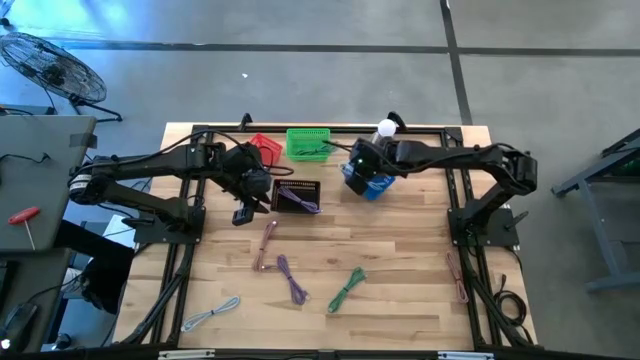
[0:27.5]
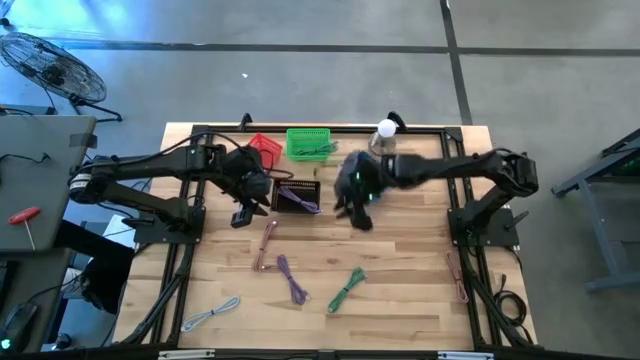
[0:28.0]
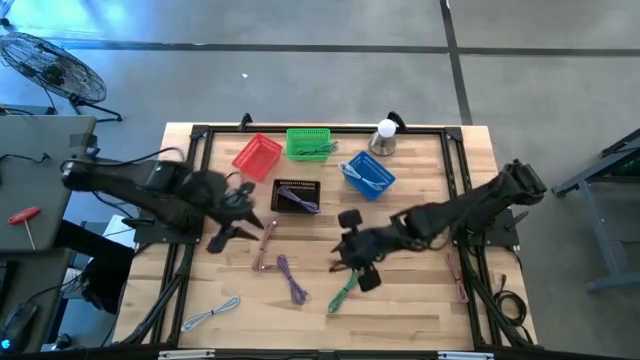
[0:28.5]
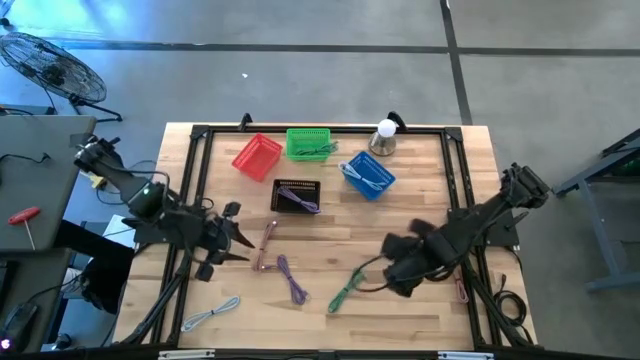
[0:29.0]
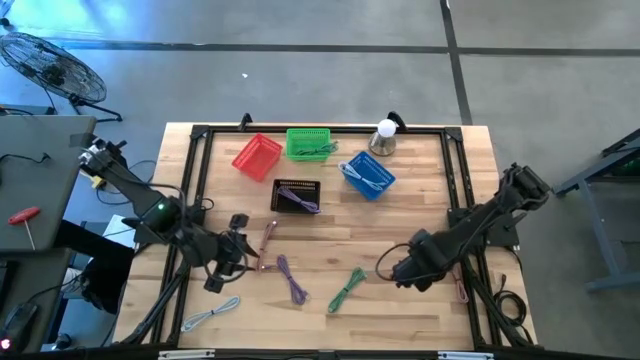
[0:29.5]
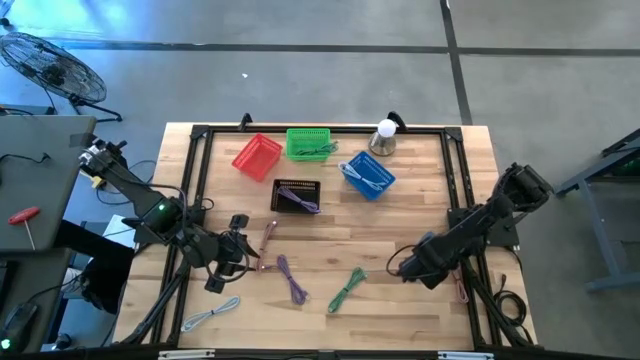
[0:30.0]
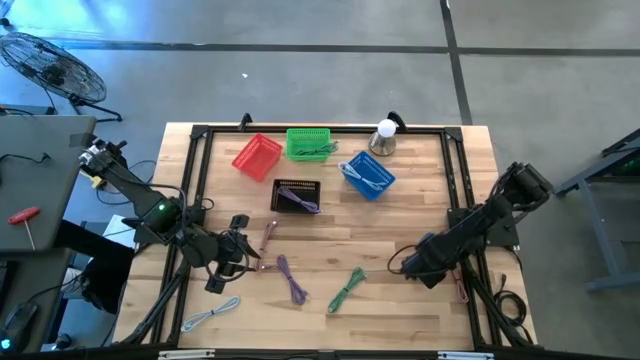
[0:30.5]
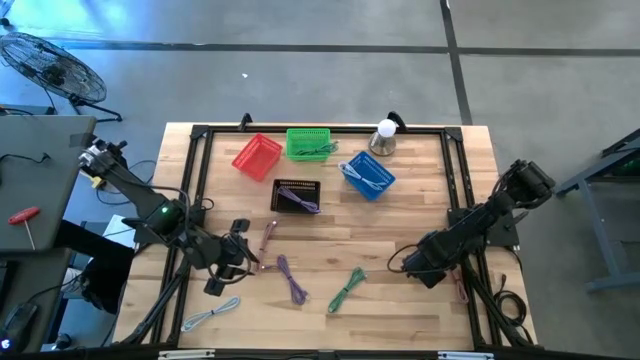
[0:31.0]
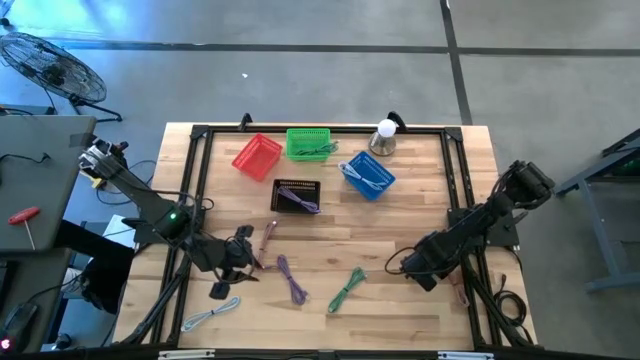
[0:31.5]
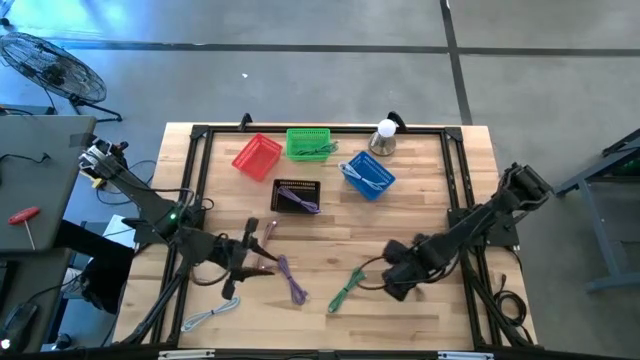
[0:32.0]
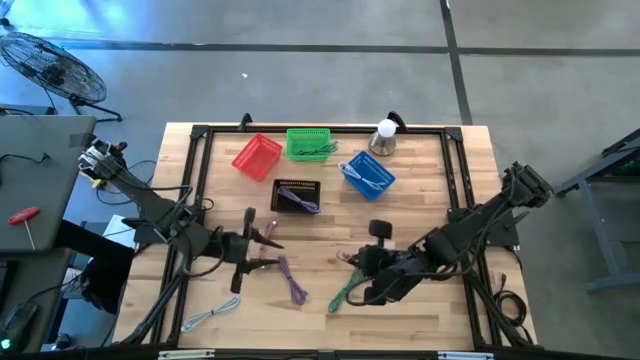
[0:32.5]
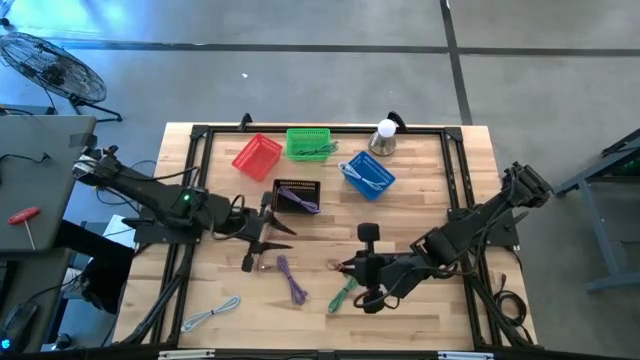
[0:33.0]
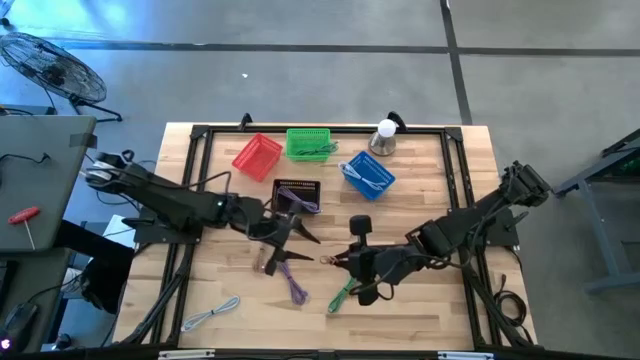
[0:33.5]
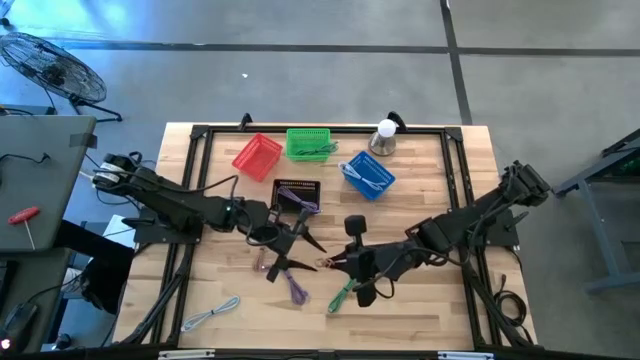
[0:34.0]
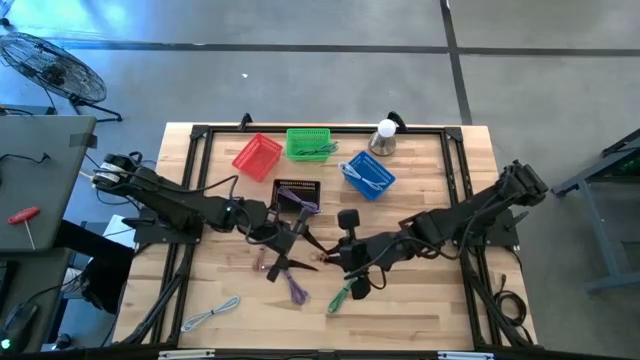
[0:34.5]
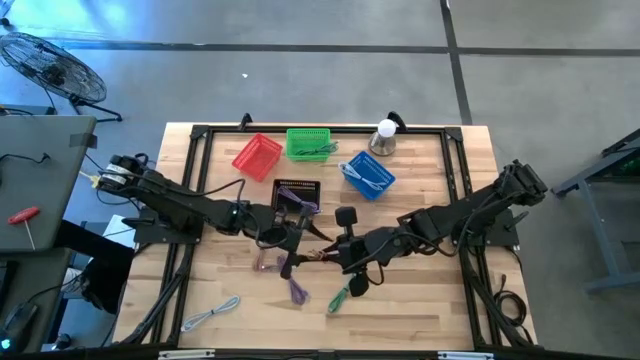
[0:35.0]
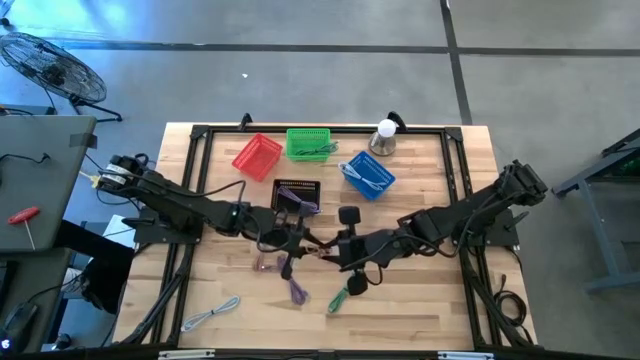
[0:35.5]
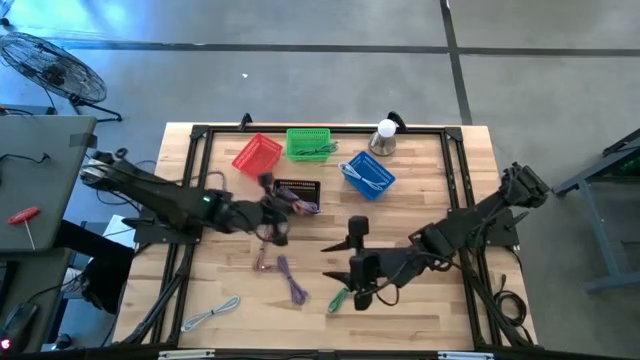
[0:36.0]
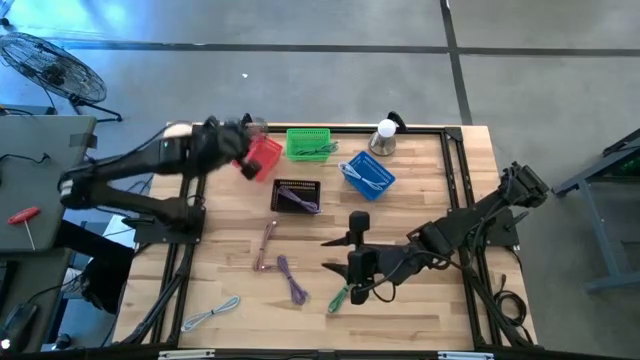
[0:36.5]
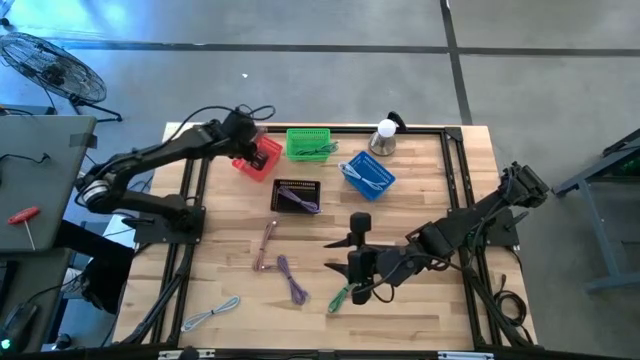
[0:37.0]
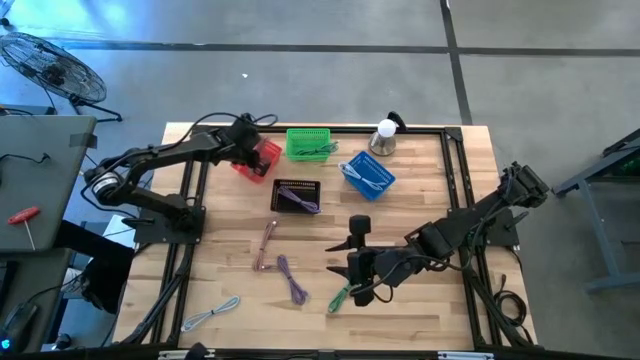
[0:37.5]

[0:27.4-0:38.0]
Task: Pick & Place USB Port
Put the pink usb cable into the red bin

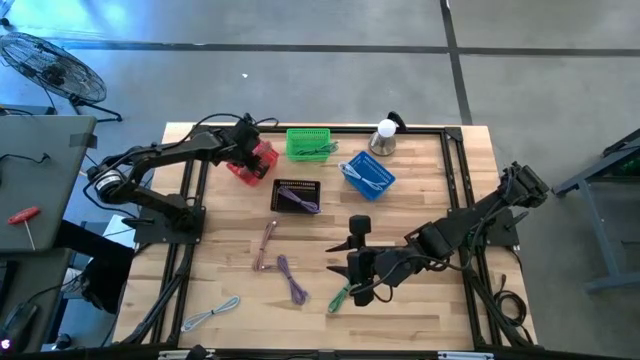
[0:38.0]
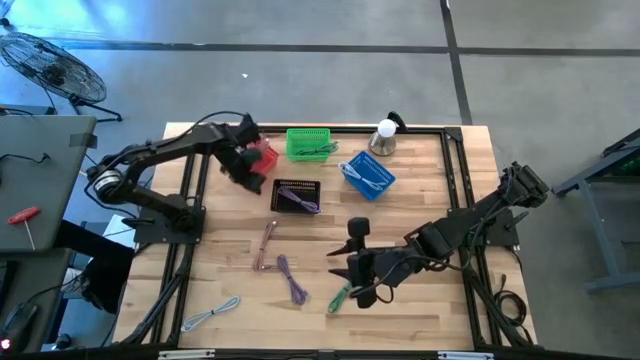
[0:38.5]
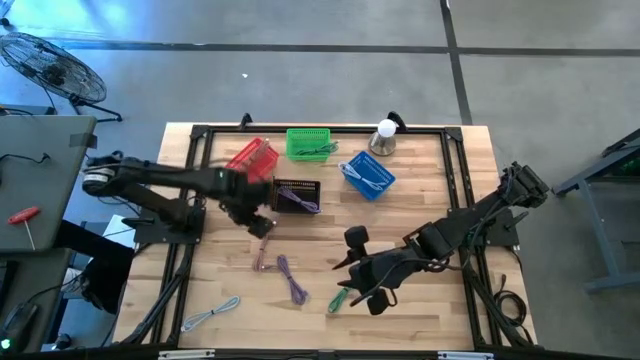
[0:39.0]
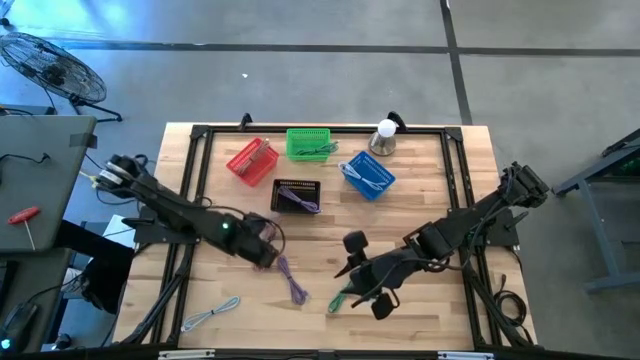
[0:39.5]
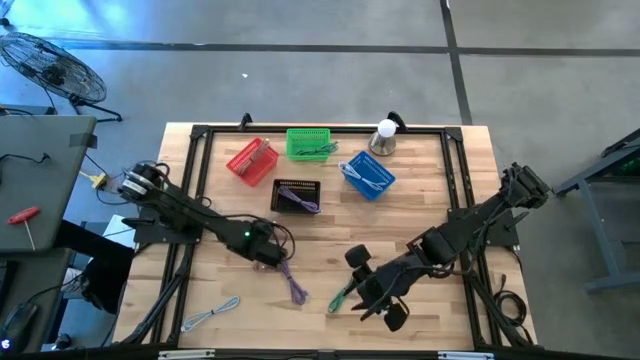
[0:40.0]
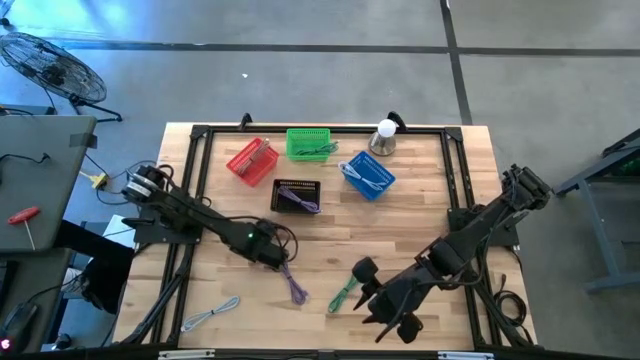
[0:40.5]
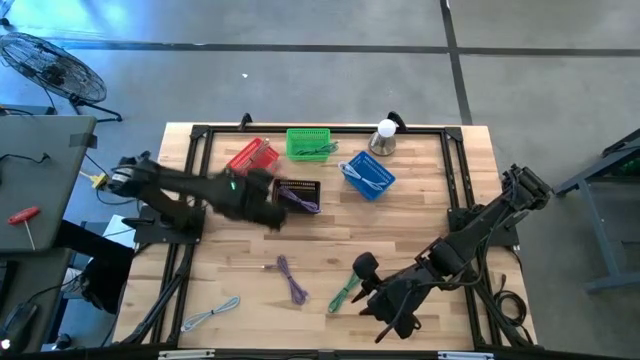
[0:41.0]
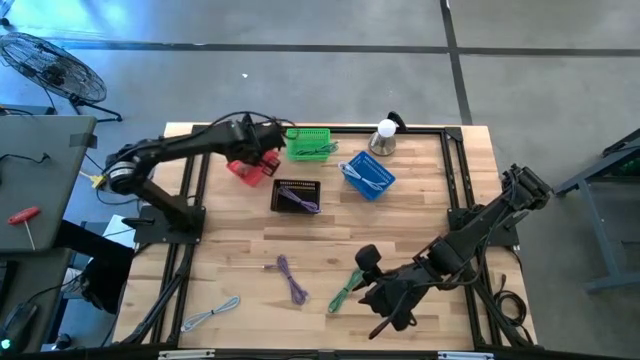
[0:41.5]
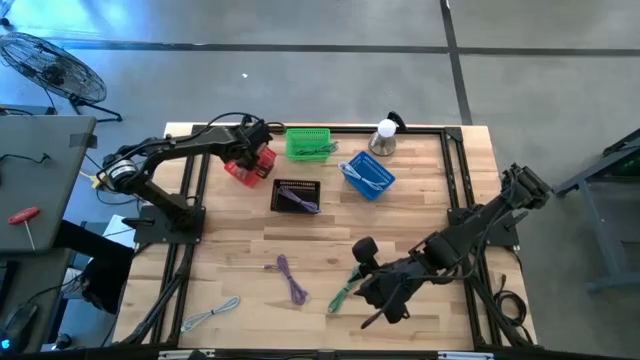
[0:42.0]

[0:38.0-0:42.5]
Put the pink usb cable into the red bin

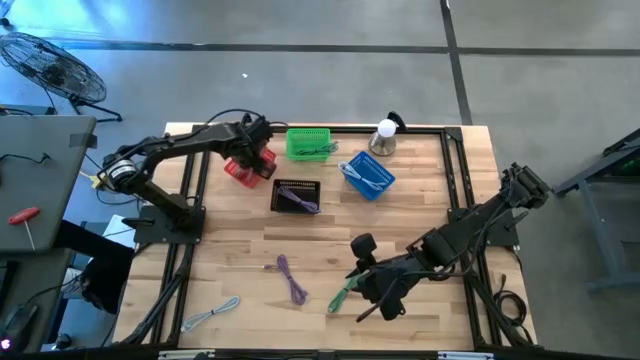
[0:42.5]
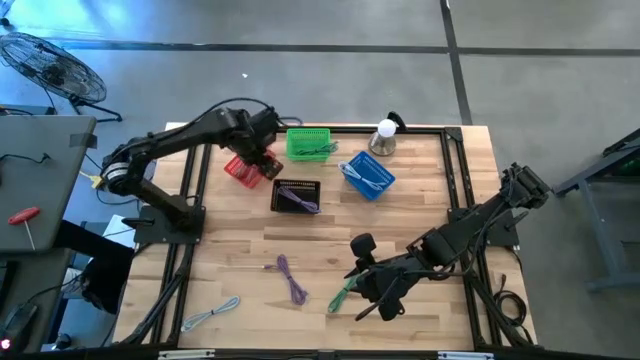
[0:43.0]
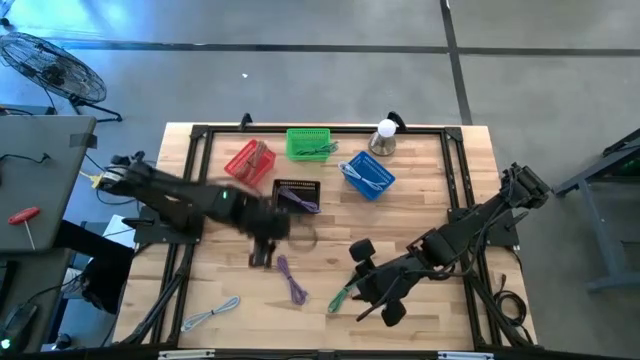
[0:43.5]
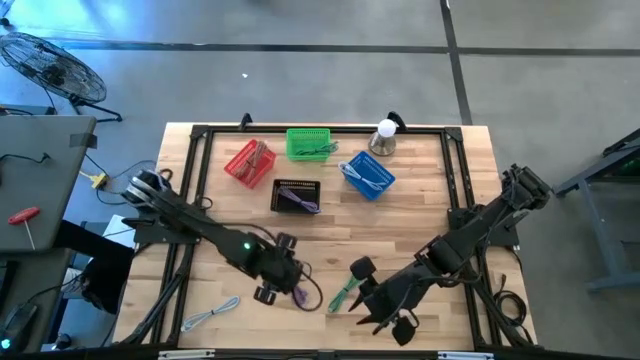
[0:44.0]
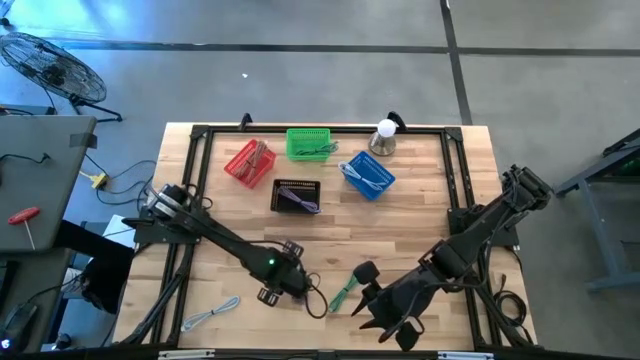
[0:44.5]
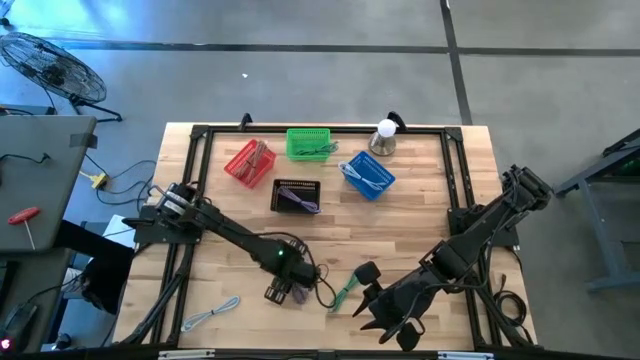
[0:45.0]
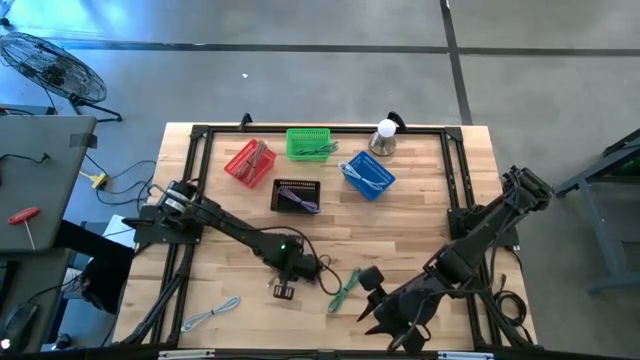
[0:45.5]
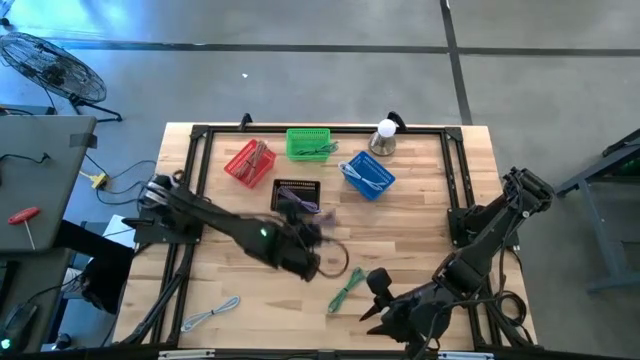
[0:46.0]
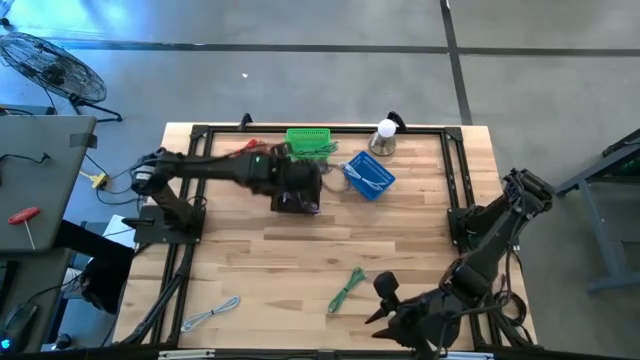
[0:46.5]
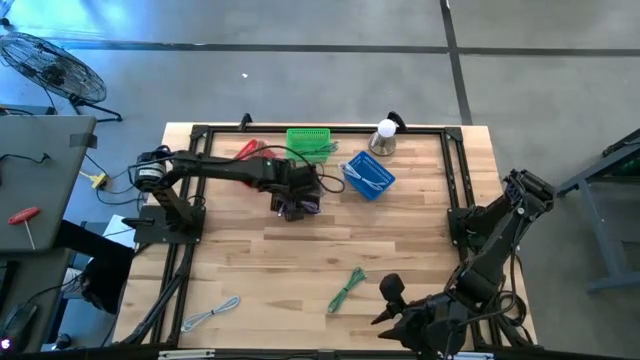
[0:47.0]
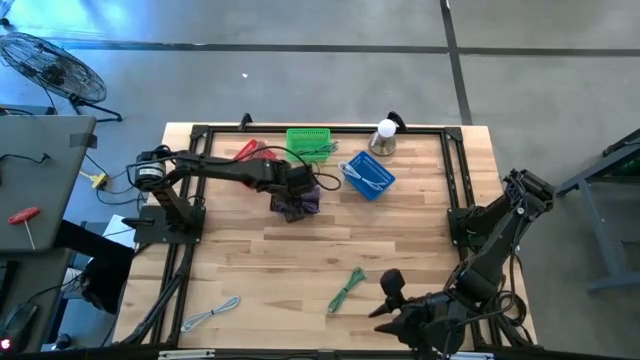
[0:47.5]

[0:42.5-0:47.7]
Put the violet usb cable into the black bin

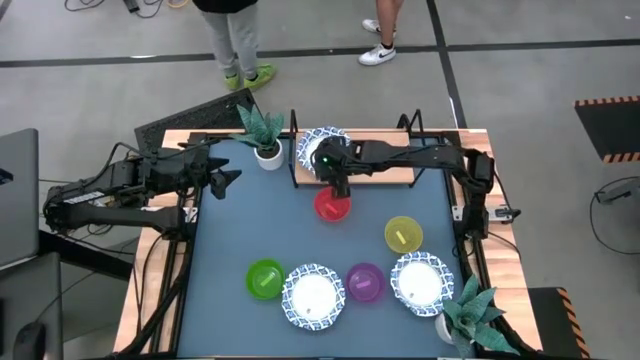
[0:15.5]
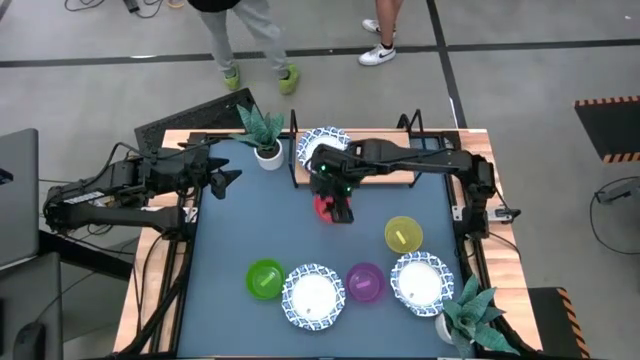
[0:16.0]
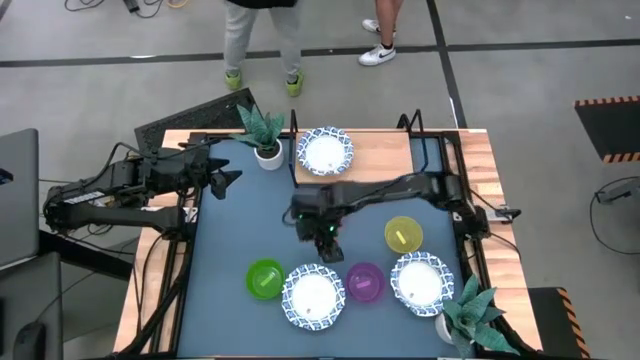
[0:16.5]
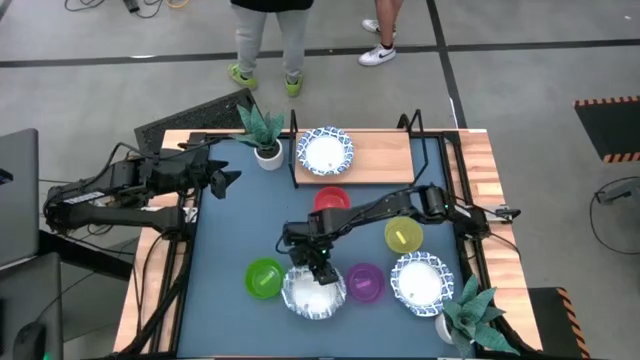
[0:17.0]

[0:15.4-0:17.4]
Task: Place and stack bowls onto a shelf
Stack the white patterned bowl on top of the white patterned bowl on the shelf
